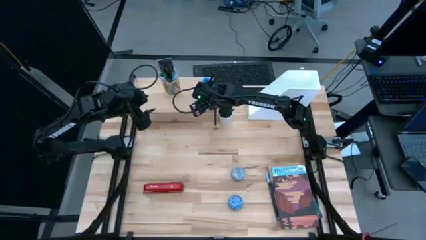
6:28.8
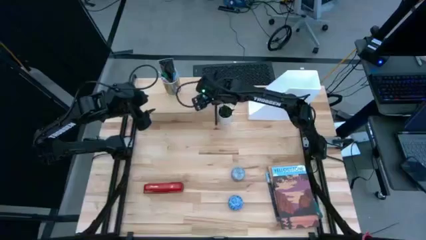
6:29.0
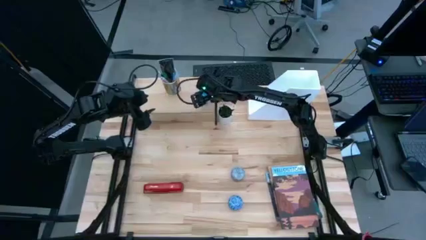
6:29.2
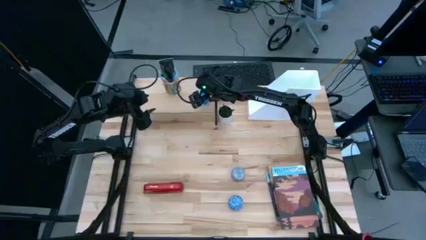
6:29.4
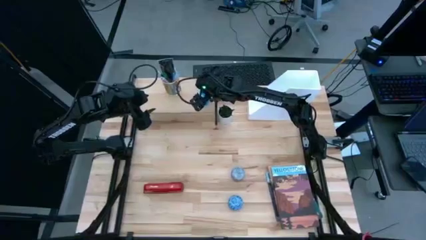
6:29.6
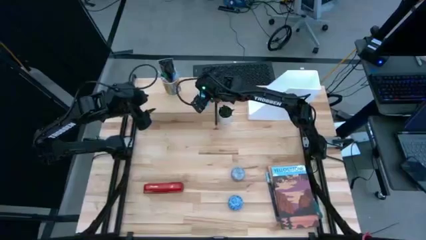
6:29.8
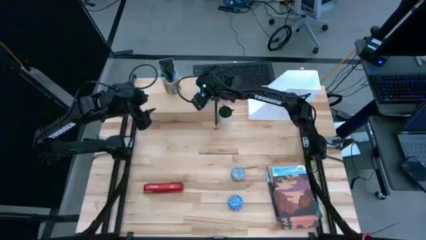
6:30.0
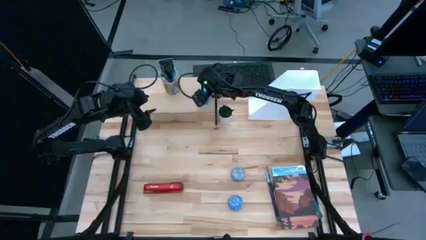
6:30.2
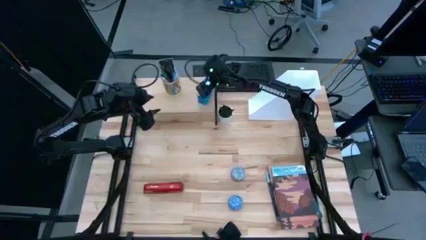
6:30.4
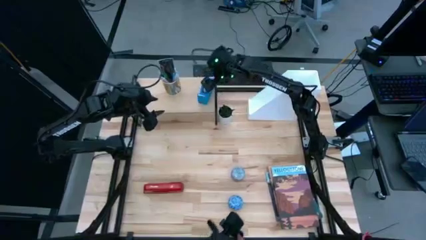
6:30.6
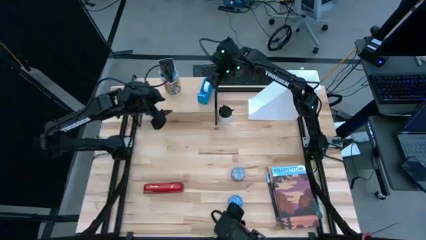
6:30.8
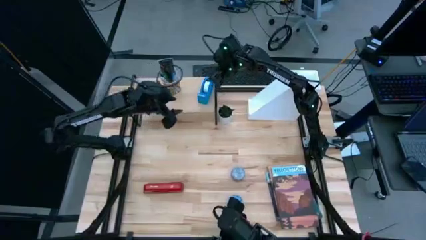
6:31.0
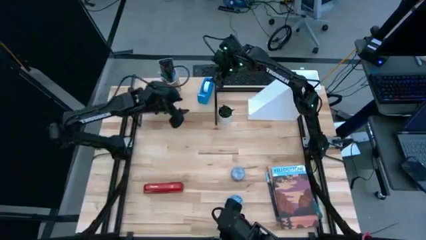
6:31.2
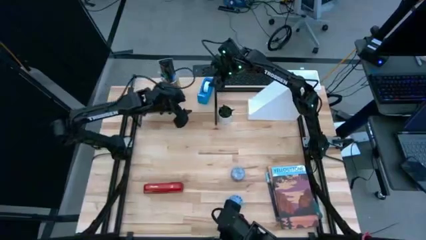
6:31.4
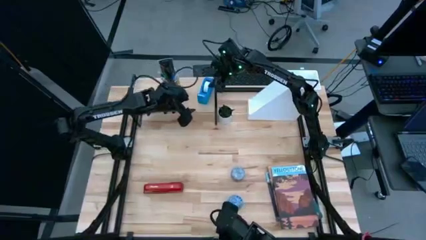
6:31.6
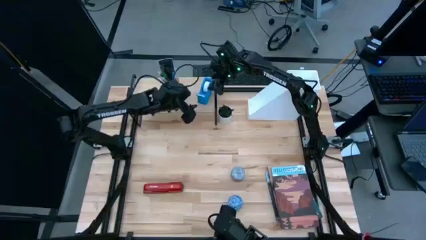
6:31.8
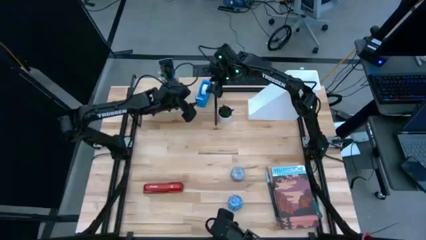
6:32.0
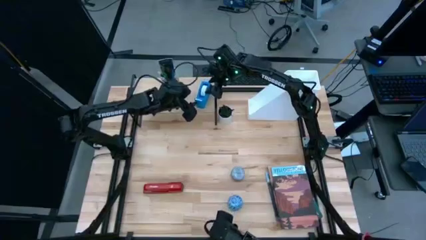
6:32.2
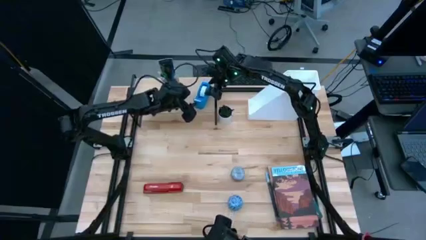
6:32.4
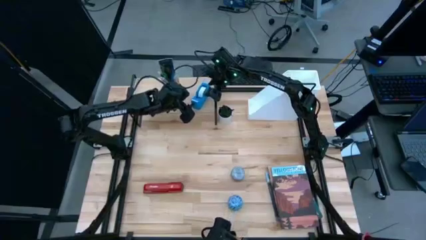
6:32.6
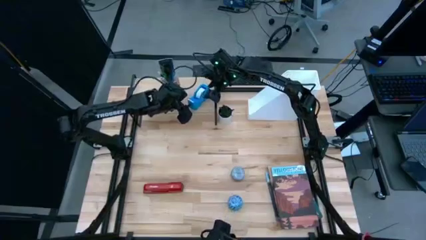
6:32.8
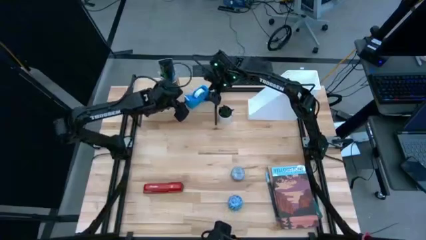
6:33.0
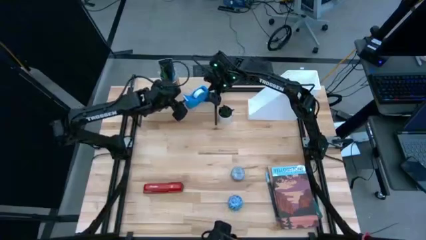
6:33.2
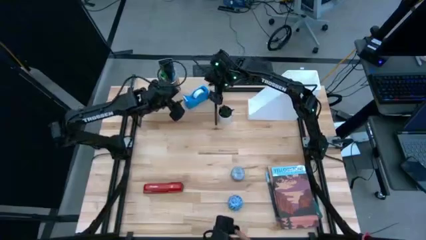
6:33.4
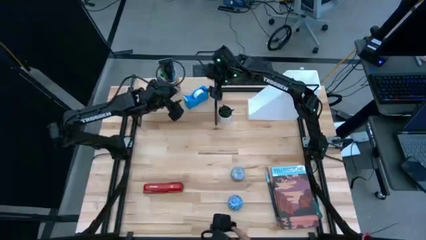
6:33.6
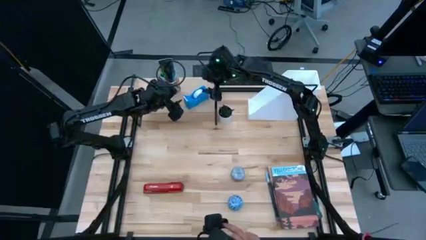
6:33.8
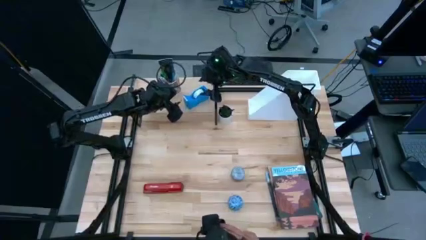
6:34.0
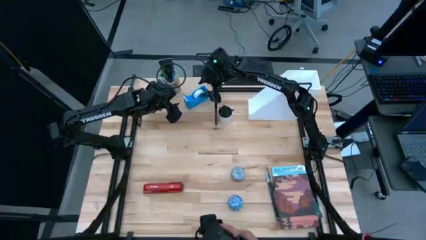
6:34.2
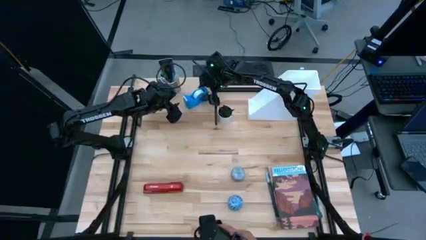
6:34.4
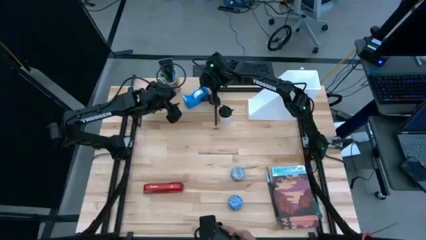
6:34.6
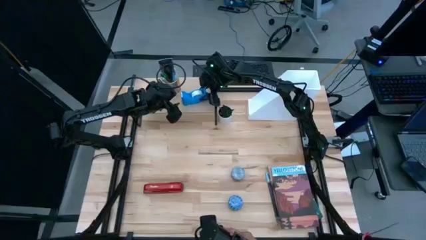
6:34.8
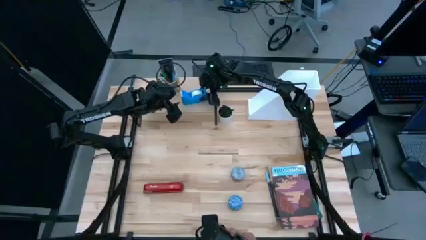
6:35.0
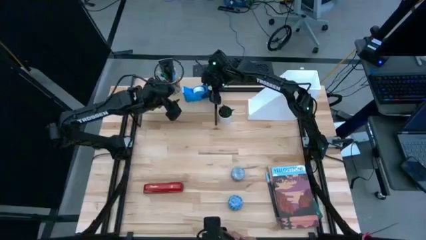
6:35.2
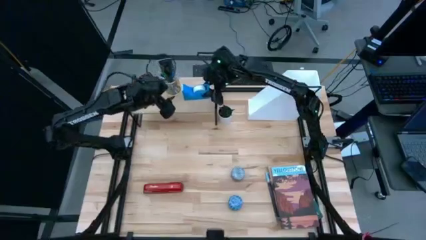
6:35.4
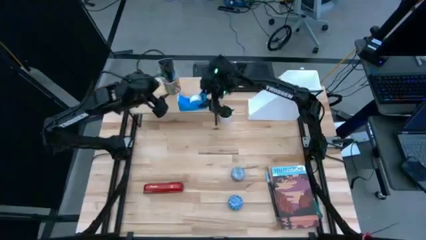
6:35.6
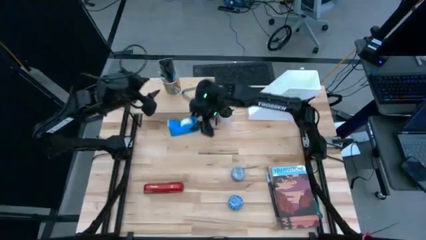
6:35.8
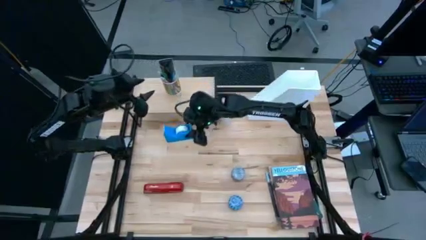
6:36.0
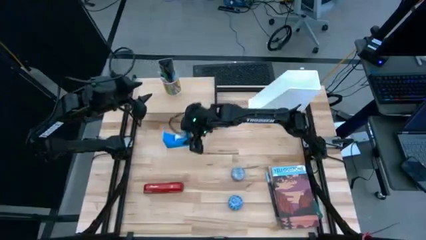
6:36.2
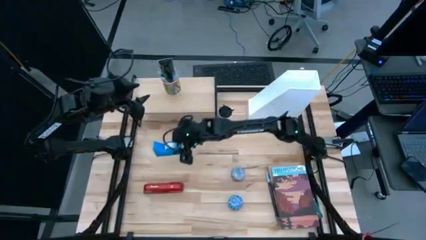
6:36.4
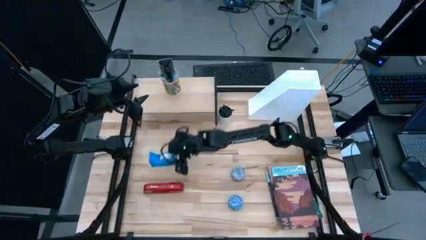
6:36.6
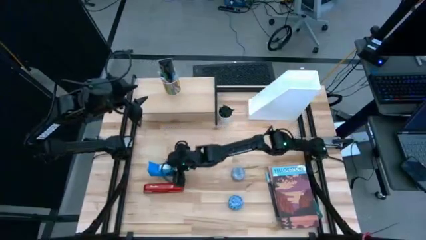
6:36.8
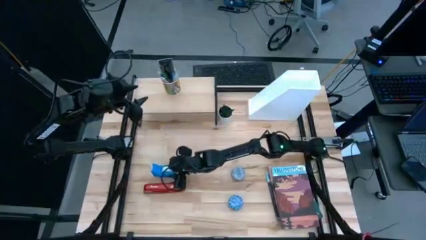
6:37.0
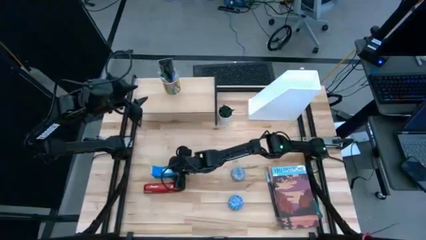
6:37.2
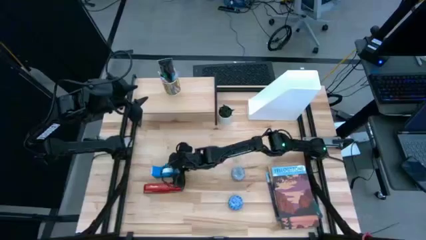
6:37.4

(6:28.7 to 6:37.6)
Task: Stock shelves
Remove the blue tape dispenser from the shelf

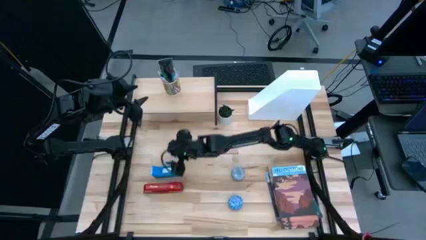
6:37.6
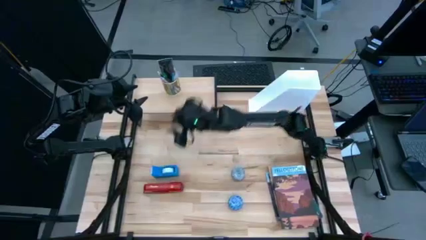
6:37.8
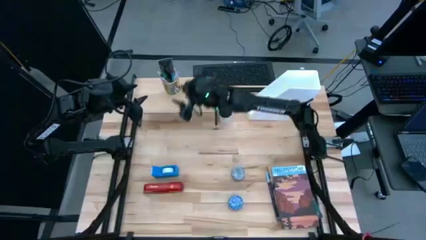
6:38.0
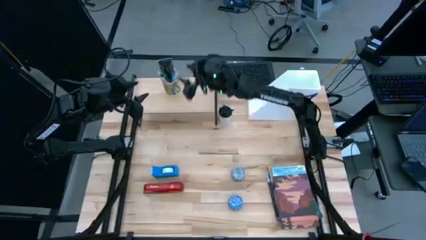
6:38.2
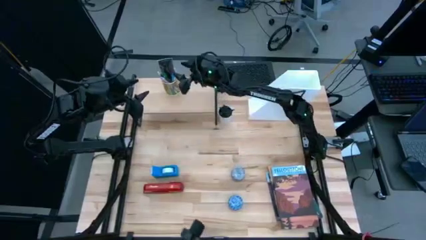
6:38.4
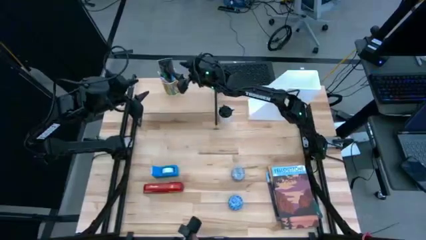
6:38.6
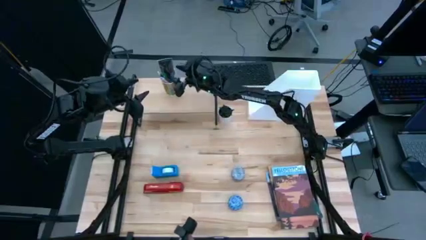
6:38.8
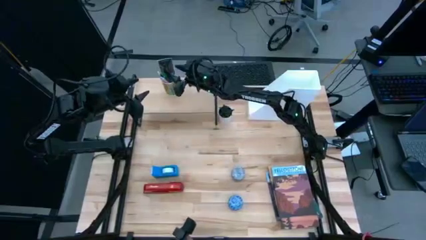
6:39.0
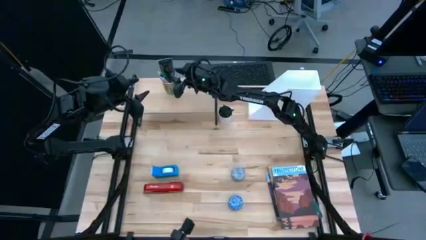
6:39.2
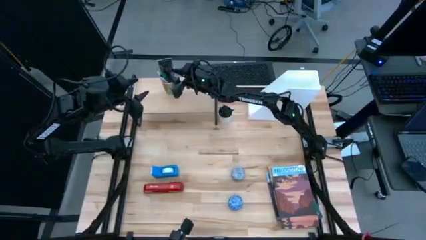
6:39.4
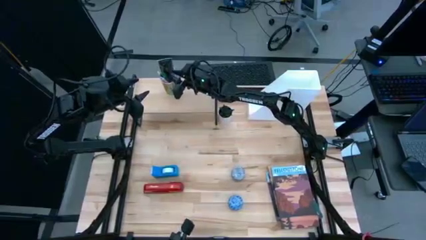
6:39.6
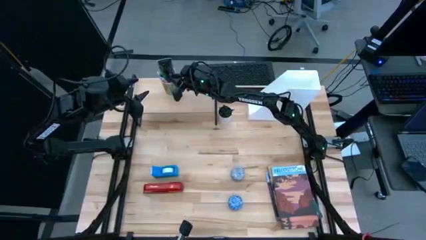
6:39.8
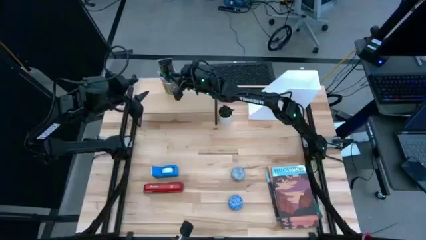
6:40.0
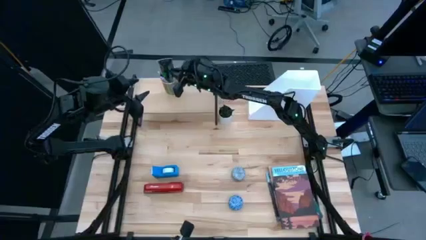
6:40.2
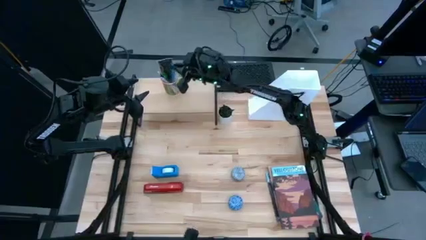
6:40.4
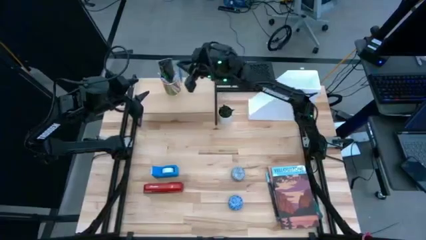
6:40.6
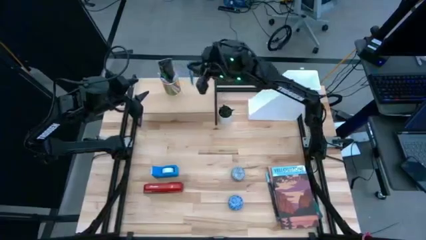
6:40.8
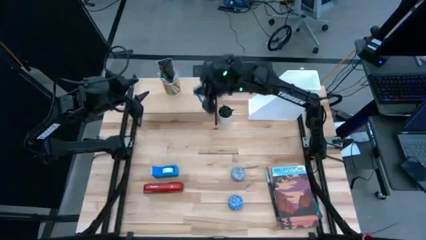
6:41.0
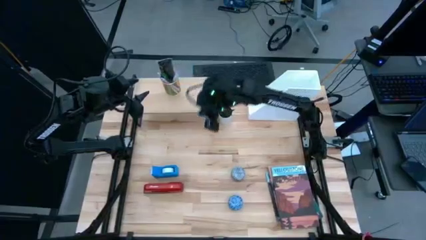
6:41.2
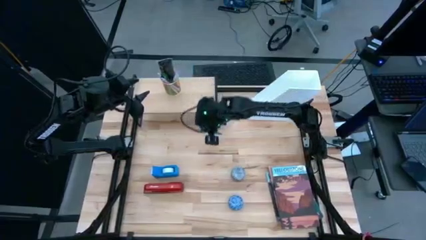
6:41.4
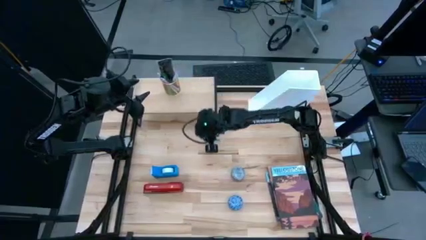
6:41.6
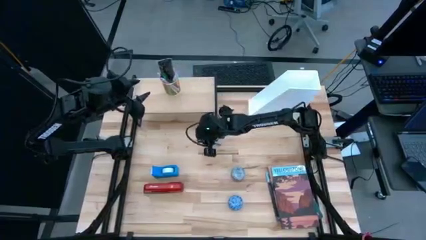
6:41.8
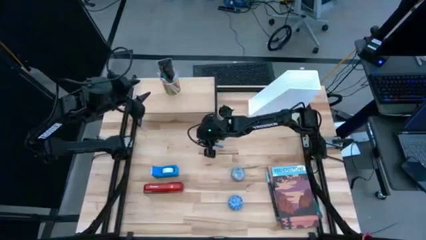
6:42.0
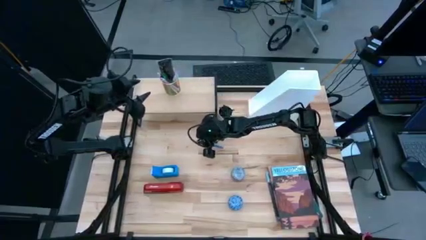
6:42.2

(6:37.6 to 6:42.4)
Remove the blue pen from the gold pen holder

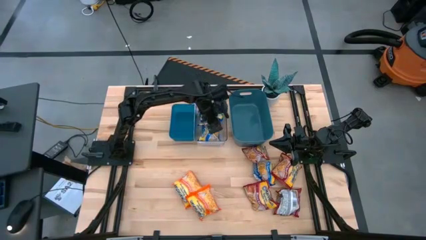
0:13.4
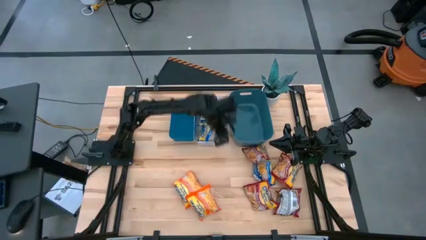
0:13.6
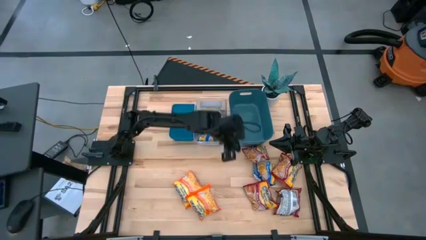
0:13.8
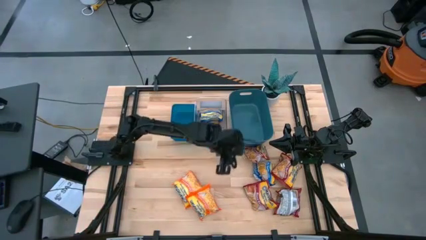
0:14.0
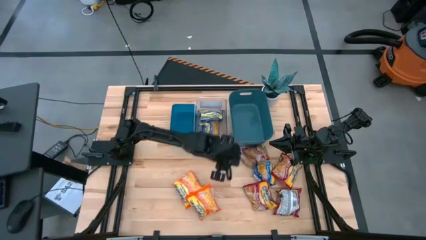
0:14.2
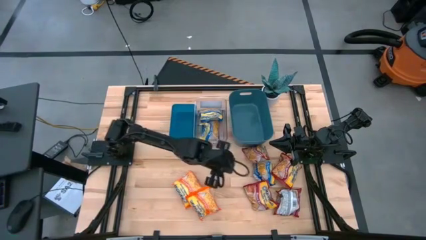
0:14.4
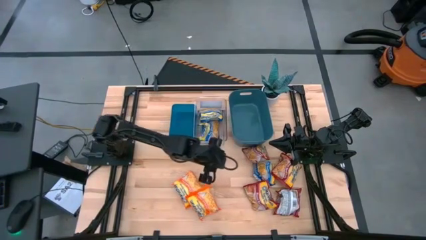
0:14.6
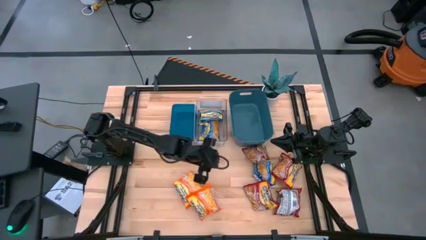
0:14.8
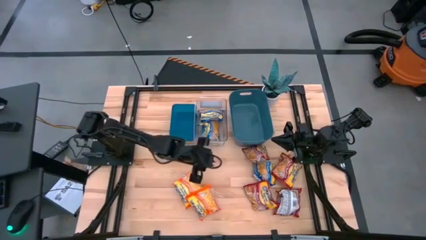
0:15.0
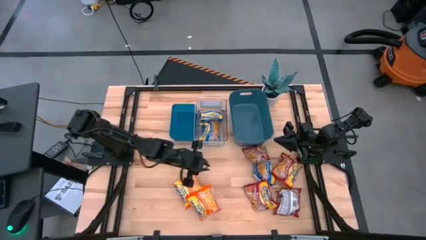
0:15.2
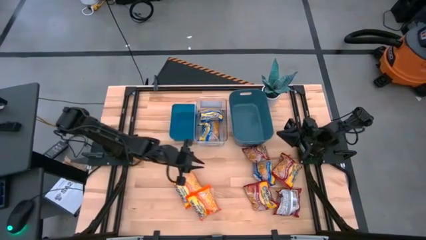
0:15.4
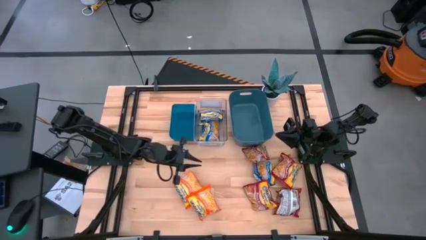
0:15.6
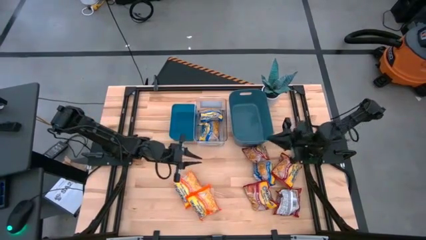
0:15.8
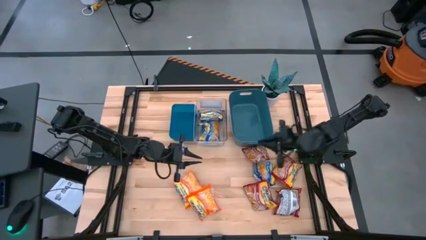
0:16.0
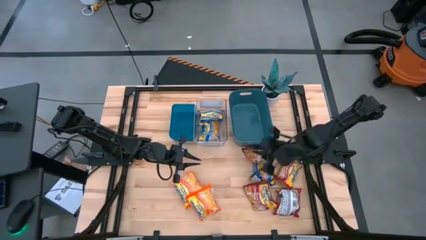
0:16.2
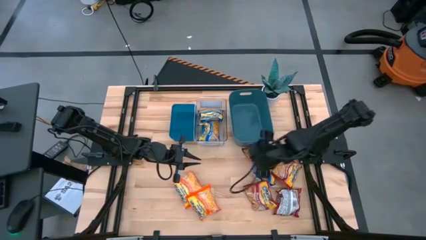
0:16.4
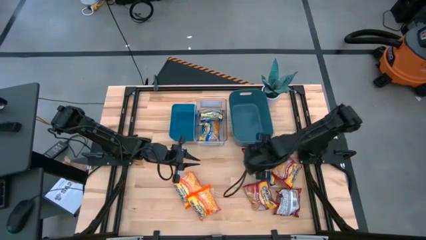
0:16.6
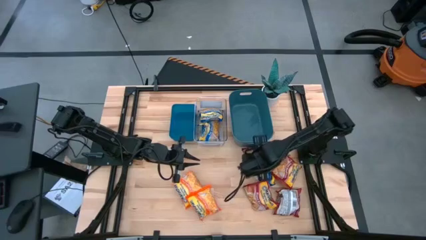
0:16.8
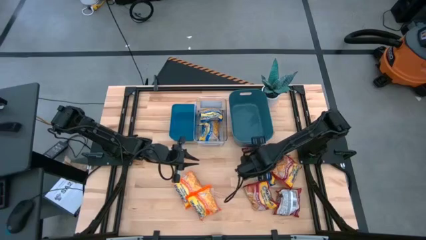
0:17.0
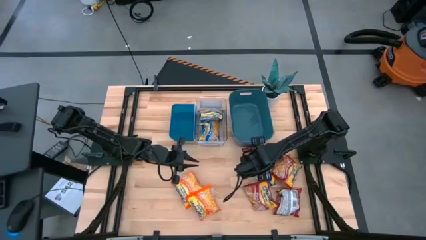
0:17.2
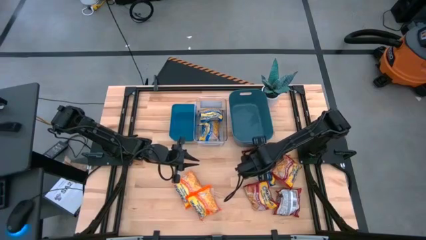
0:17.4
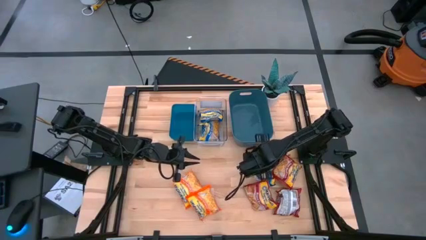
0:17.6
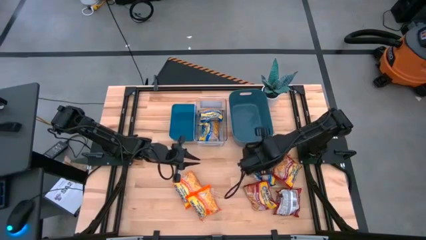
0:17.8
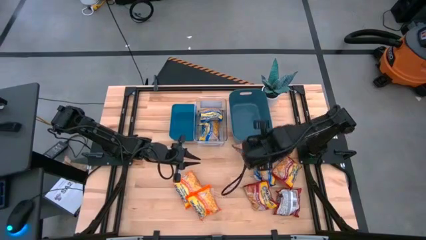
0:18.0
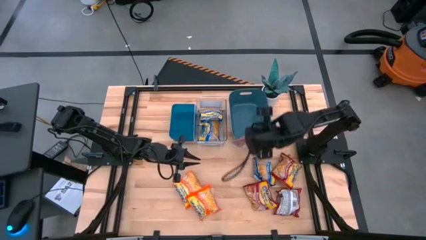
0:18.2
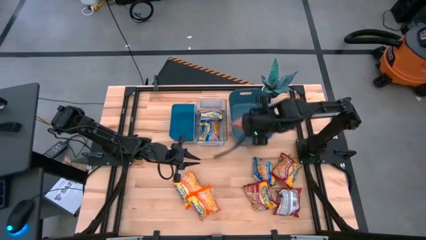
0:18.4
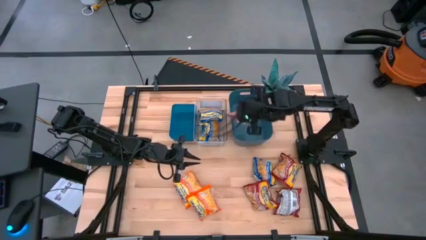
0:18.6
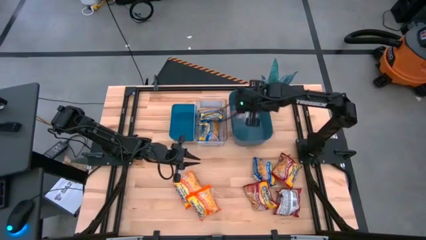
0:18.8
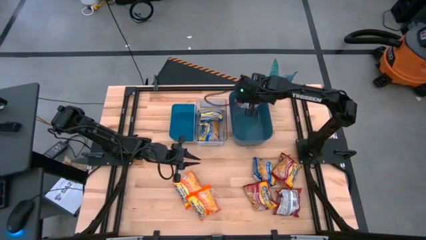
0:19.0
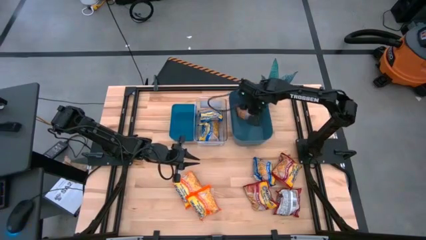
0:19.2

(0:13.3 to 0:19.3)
Task: Sort Maruchan noodles
Put the red noodle pack into the dark blue bin
